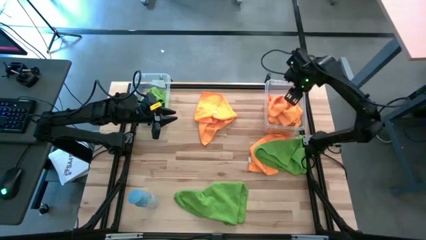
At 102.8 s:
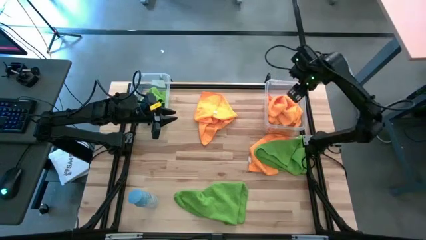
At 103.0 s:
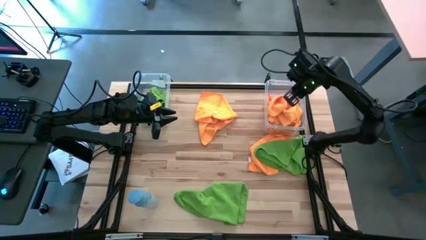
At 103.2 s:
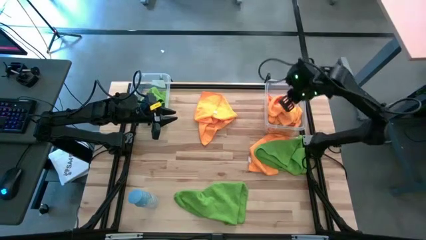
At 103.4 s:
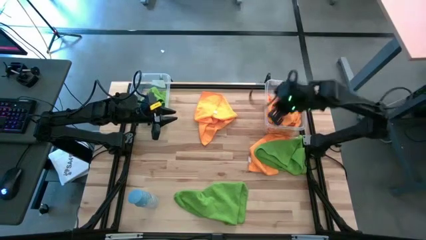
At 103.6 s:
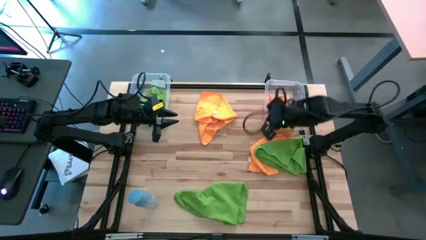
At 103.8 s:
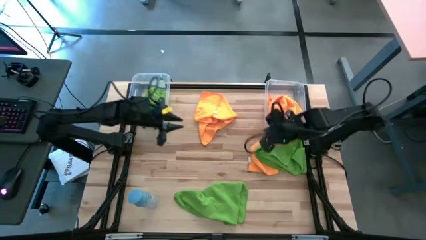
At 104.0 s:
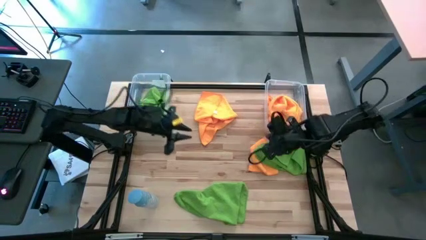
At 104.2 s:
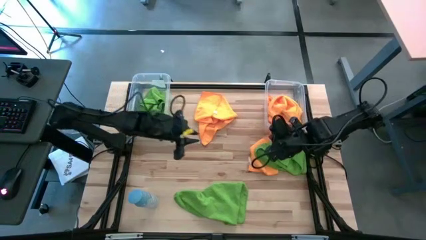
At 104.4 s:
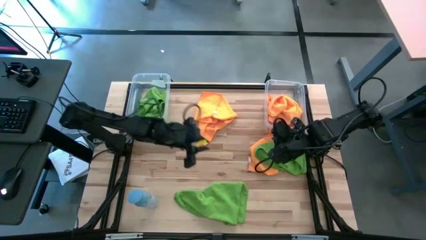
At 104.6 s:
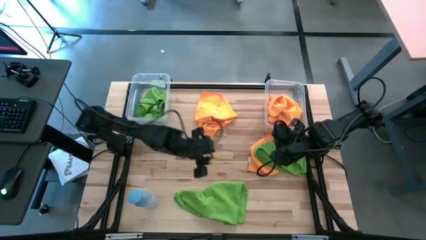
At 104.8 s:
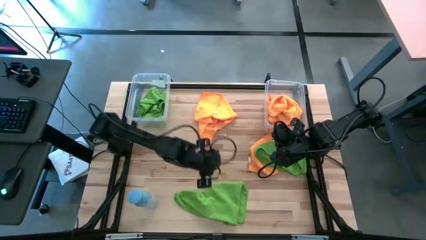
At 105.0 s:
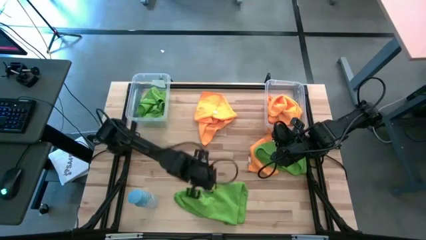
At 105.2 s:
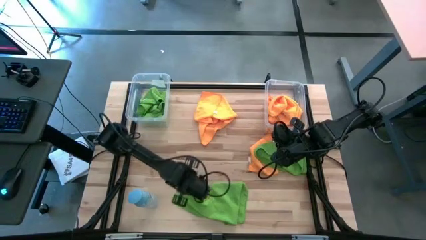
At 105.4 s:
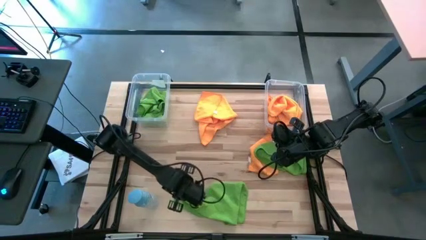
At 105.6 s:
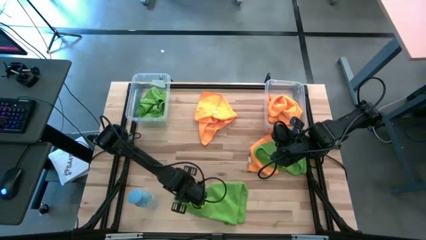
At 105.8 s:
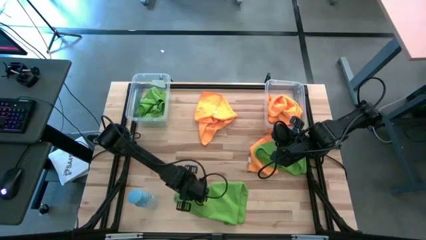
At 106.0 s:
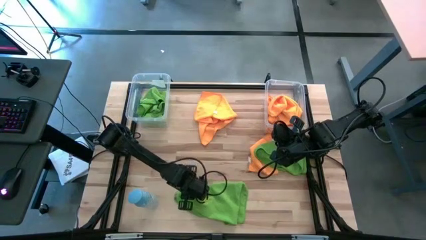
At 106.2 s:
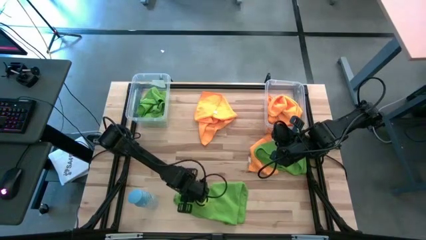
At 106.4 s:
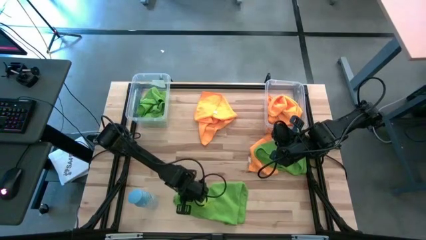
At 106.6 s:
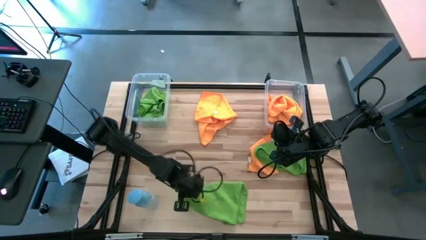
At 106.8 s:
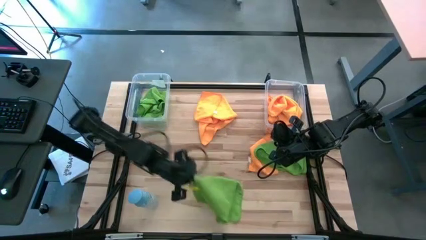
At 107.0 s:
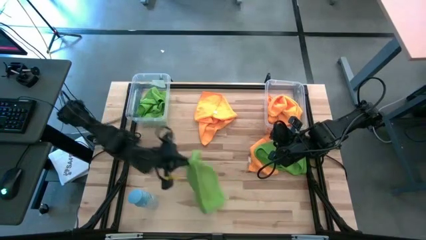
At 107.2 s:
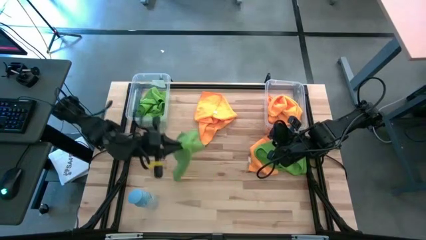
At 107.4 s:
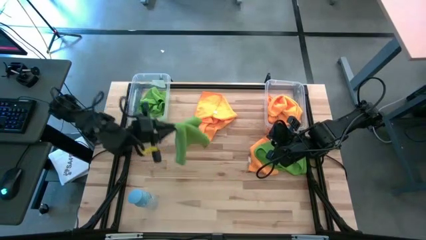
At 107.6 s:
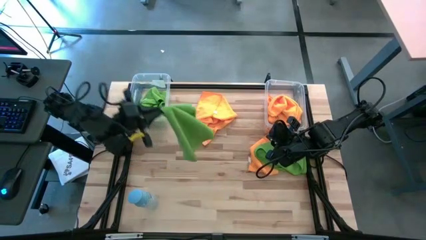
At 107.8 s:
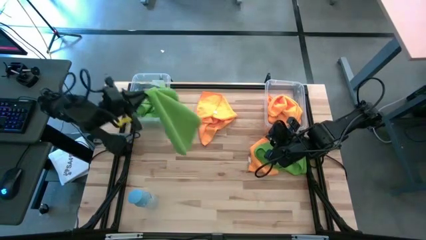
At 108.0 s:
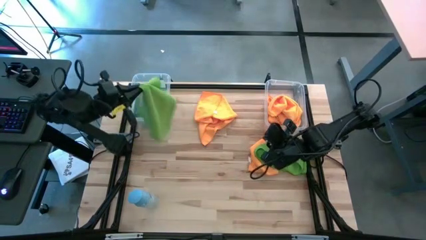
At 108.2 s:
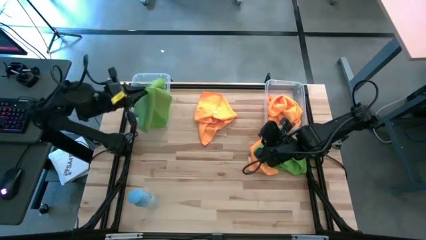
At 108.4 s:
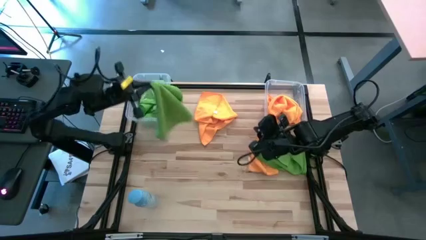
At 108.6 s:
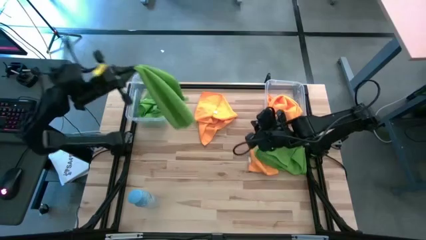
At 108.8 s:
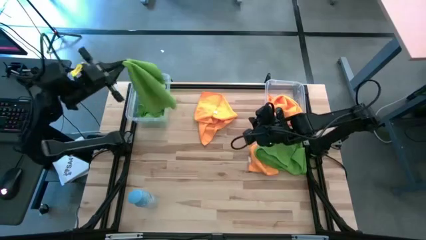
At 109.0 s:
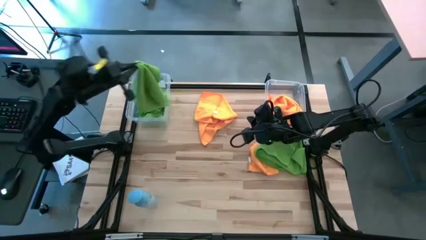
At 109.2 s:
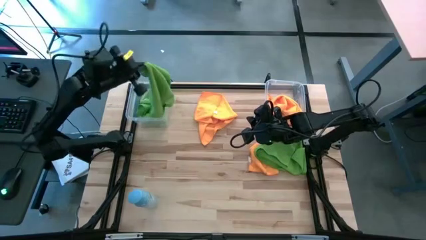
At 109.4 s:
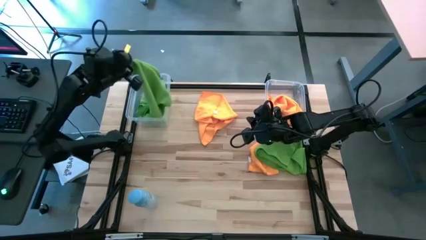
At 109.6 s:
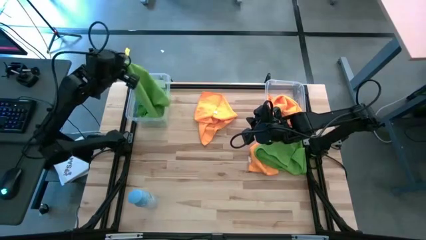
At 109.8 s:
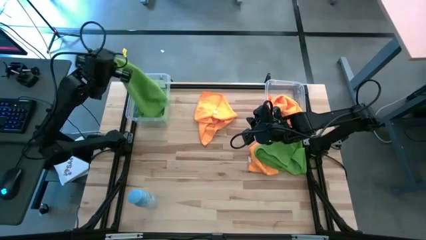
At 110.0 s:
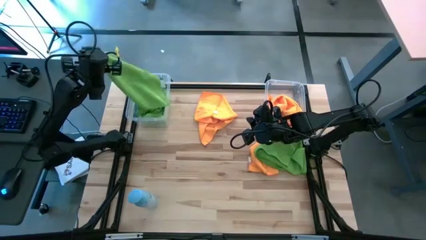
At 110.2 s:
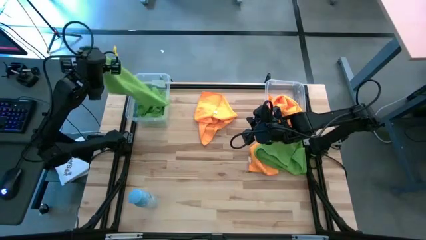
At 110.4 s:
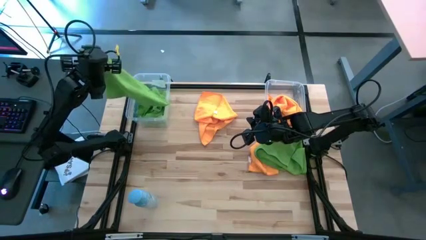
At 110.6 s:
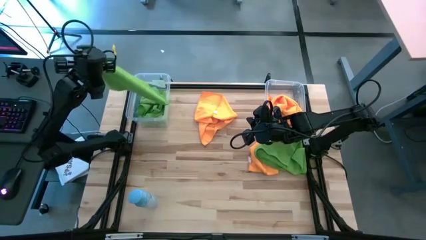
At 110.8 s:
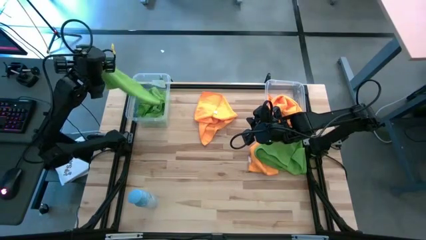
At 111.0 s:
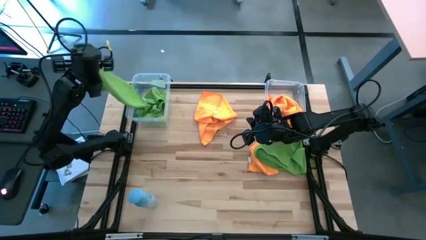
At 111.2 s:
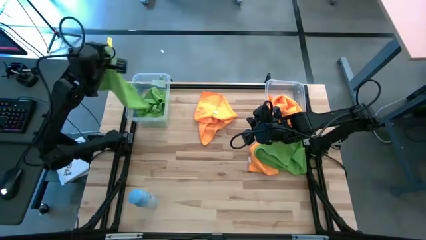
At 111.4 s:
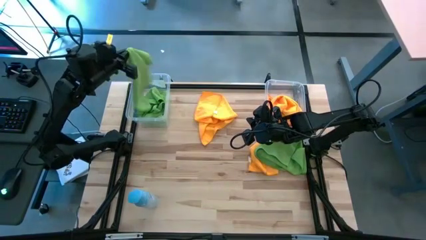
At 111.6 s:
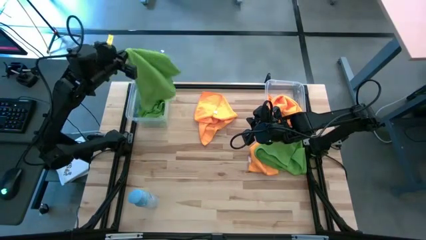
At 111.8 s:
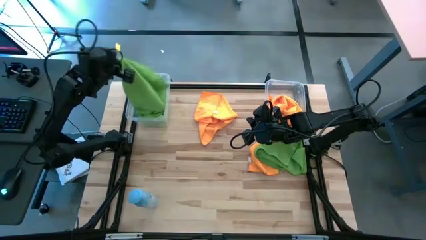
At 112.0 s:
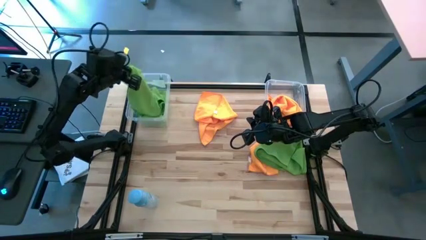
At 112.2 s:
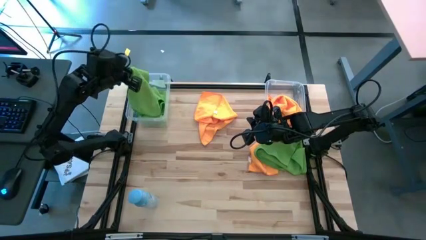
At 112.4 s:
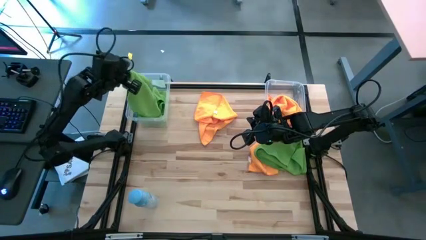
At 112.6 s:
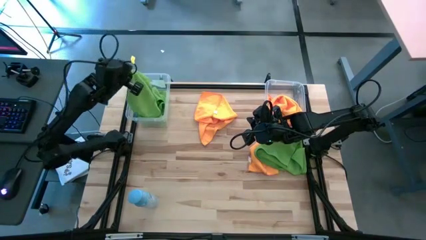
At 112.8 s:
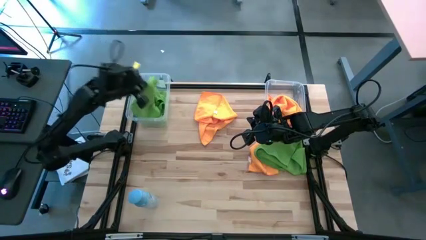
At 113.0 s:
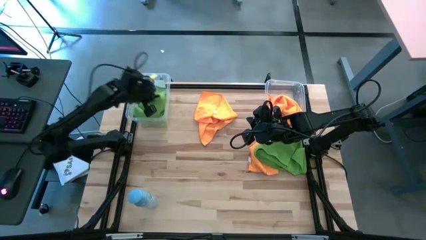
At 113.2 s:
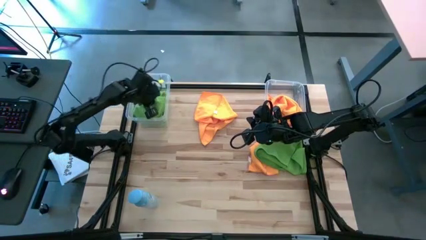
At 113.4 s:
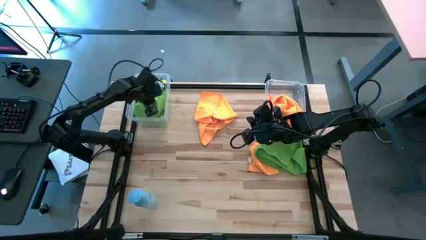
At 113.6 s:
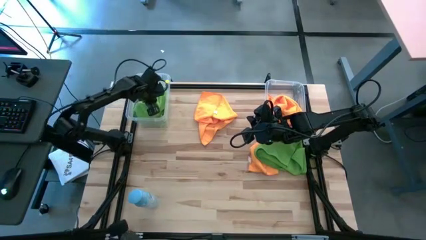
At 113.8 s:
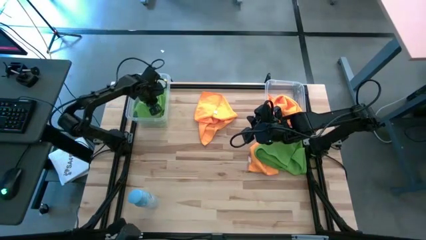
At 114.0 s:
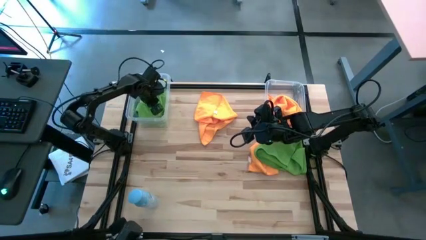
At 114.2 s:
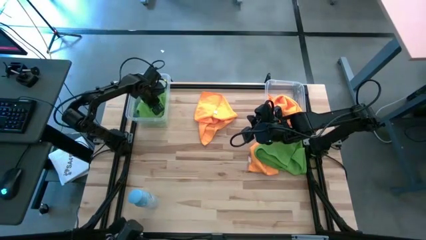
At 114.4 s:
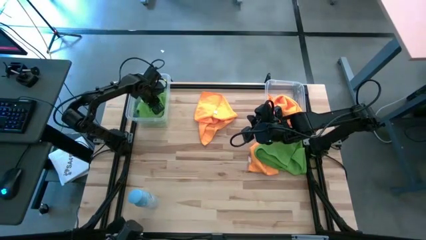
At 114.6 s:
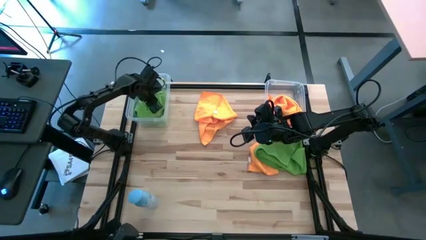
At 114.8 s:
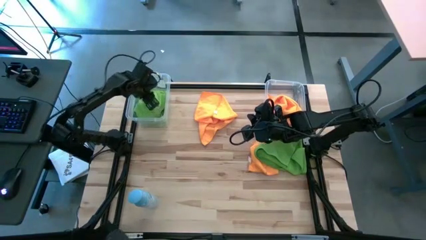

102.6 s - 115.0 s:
Task: Sort microfiber towel by color & place in baskets
Put the green microfiber towel into the left transparent bin
